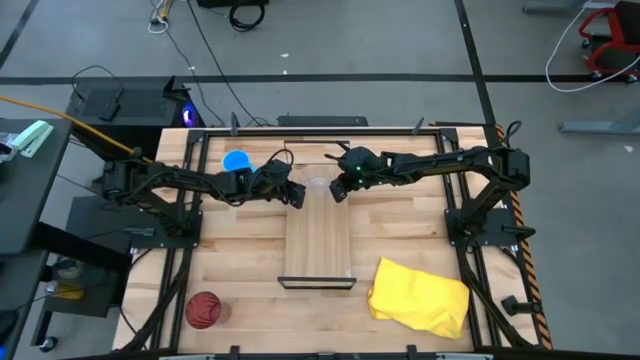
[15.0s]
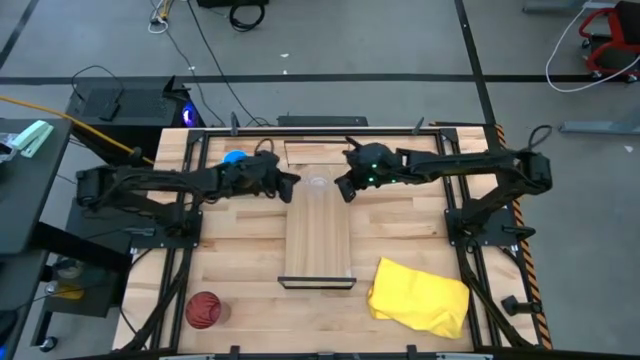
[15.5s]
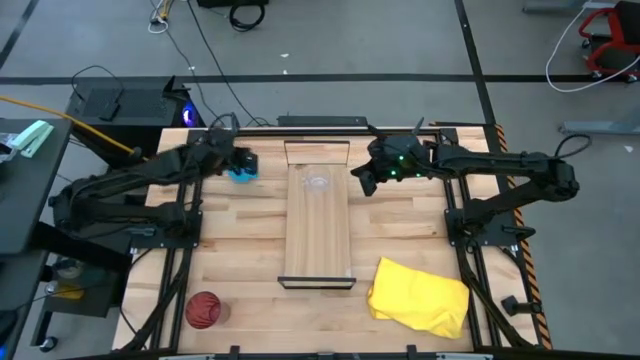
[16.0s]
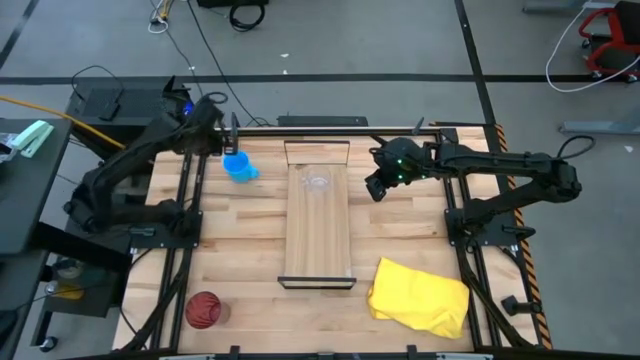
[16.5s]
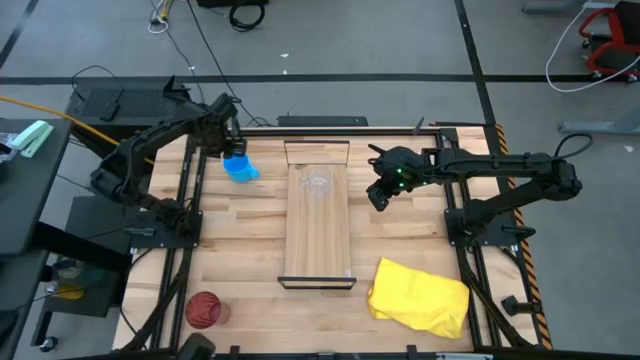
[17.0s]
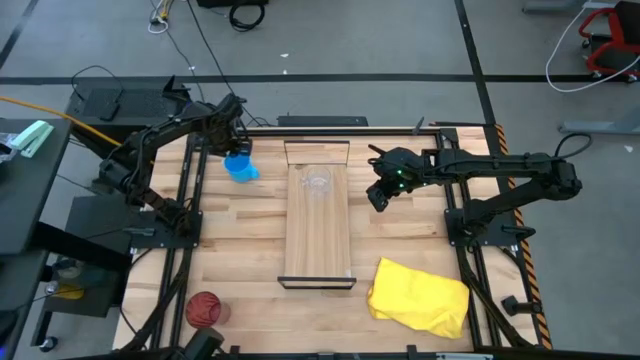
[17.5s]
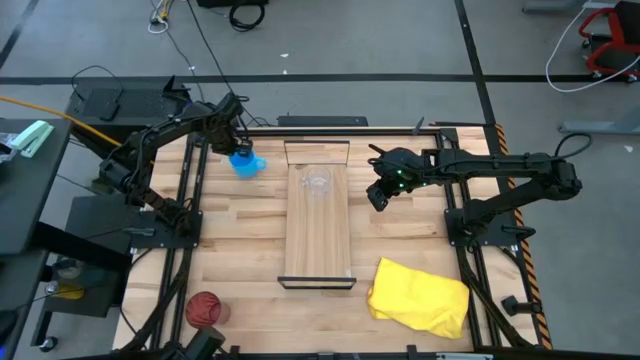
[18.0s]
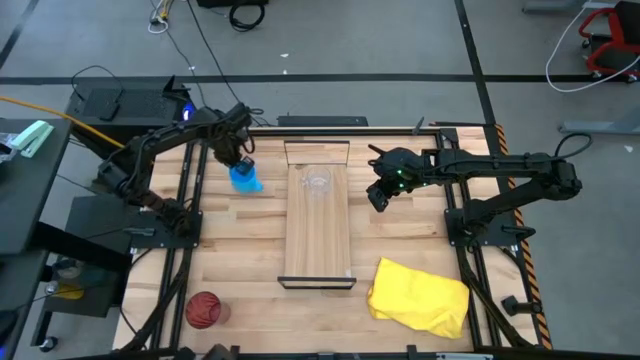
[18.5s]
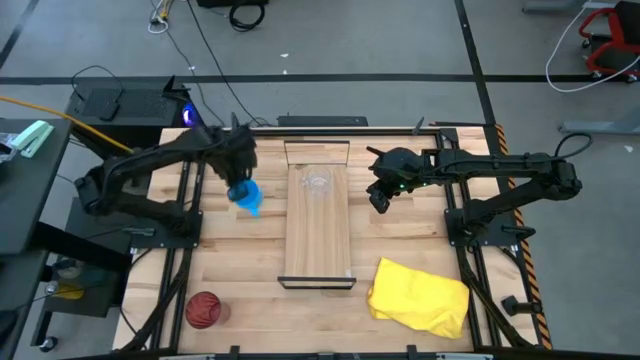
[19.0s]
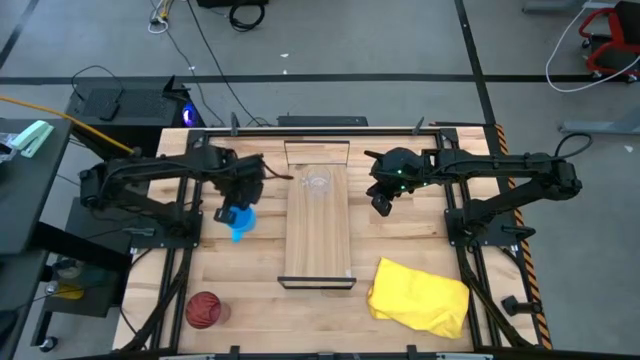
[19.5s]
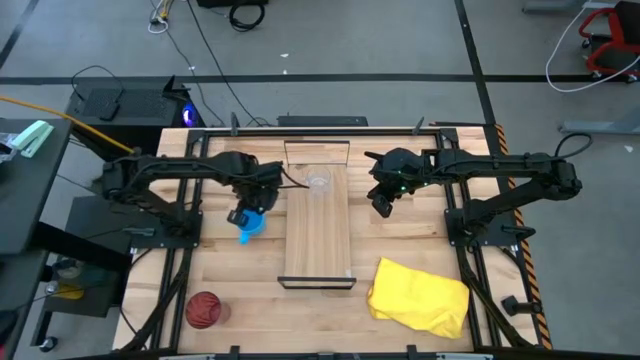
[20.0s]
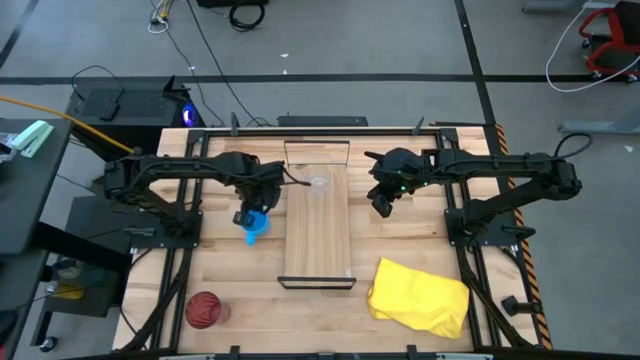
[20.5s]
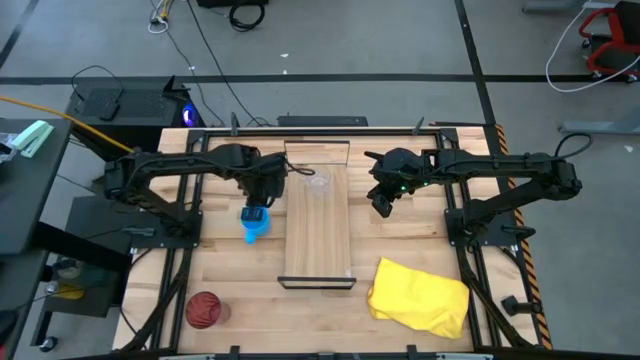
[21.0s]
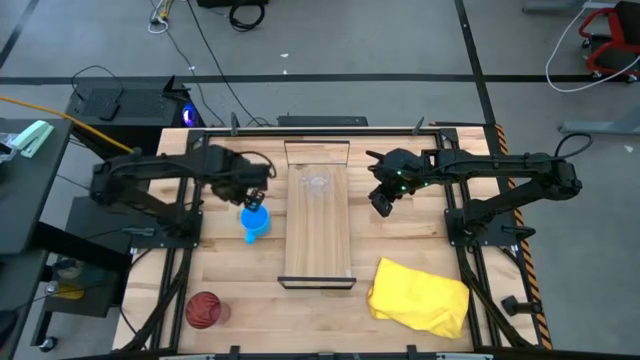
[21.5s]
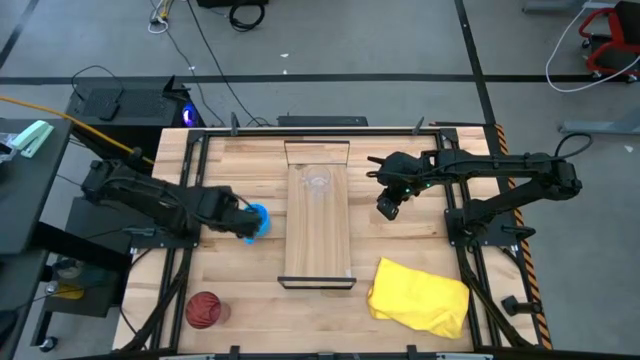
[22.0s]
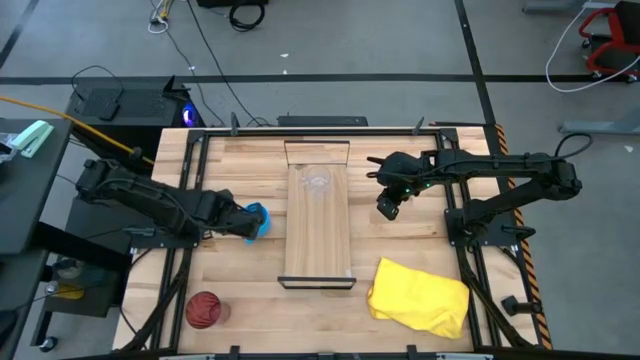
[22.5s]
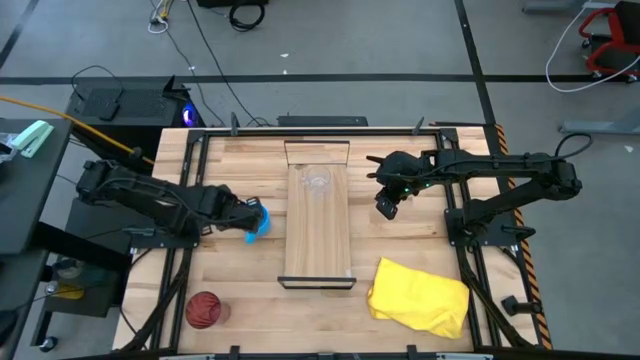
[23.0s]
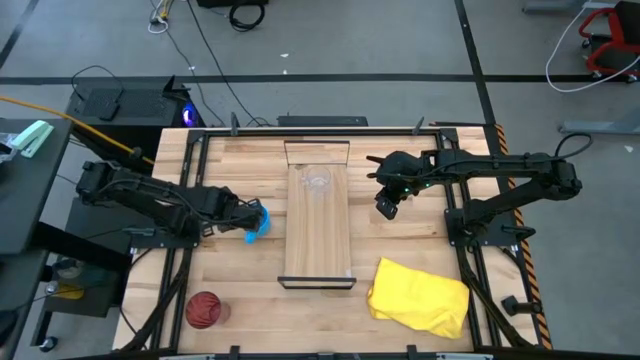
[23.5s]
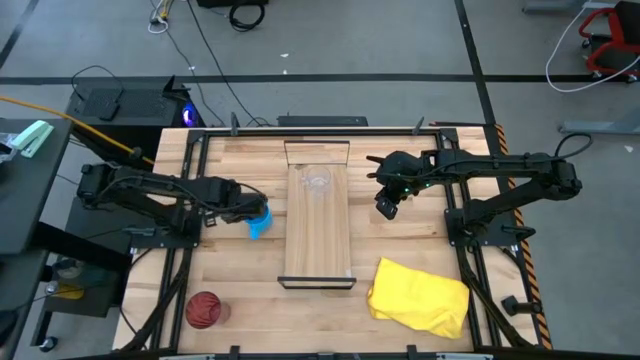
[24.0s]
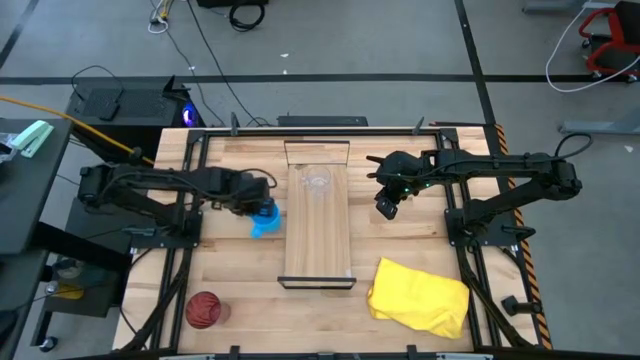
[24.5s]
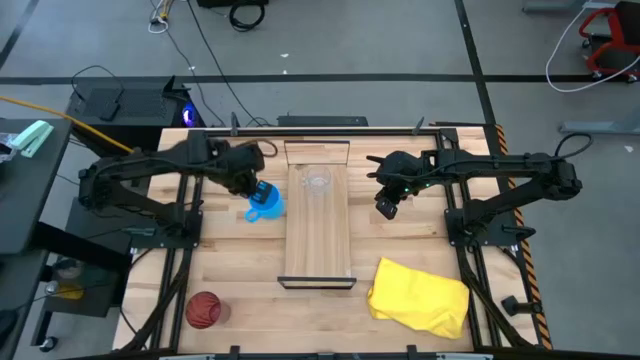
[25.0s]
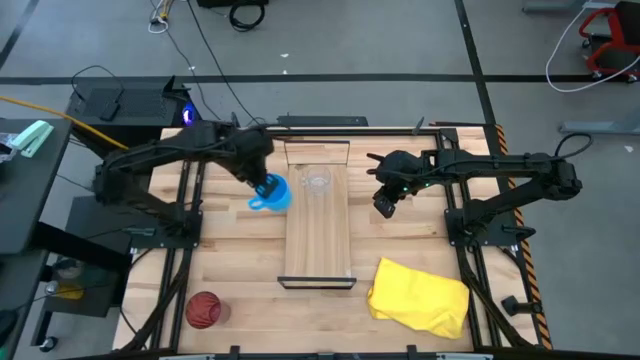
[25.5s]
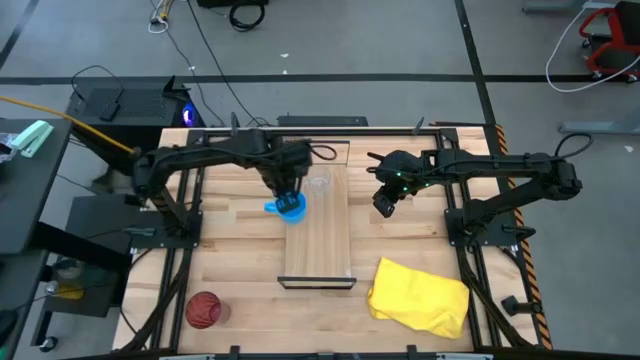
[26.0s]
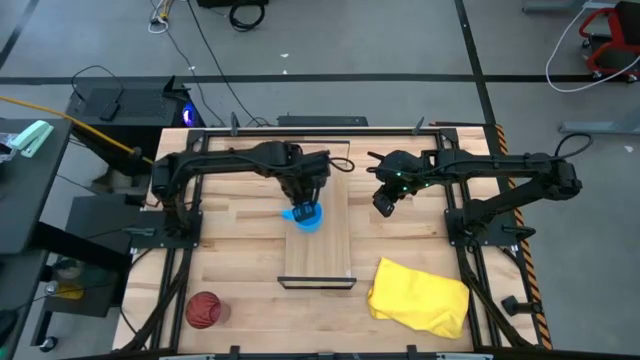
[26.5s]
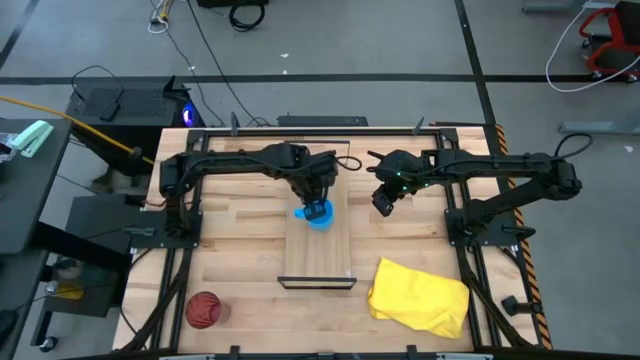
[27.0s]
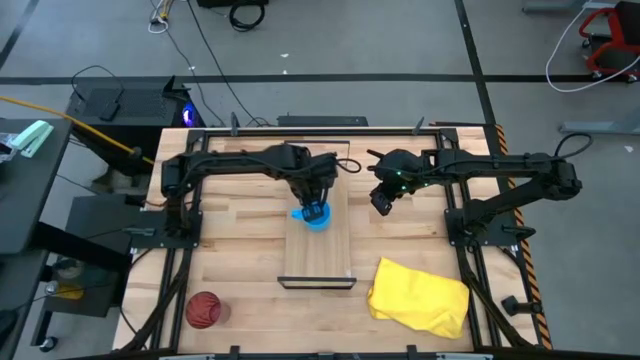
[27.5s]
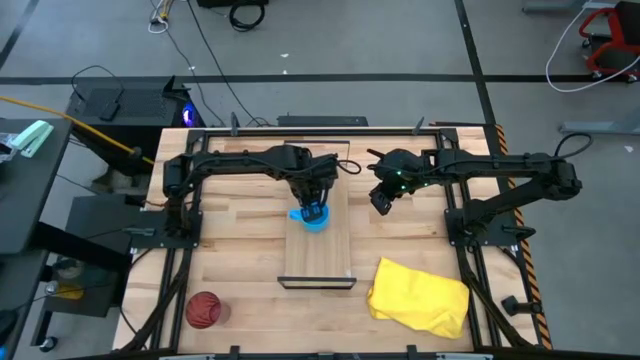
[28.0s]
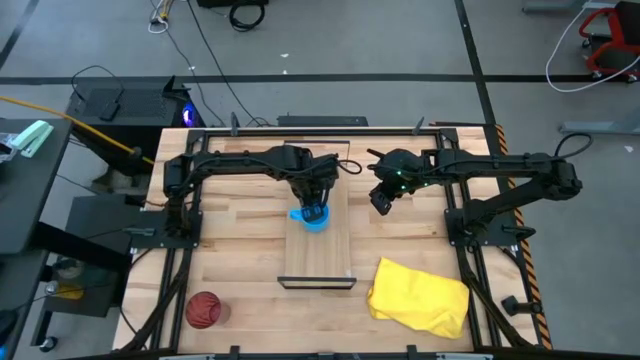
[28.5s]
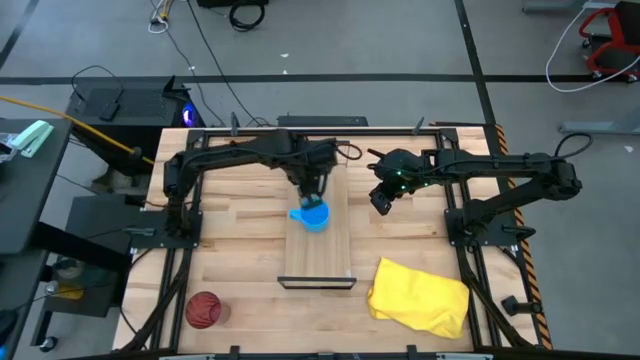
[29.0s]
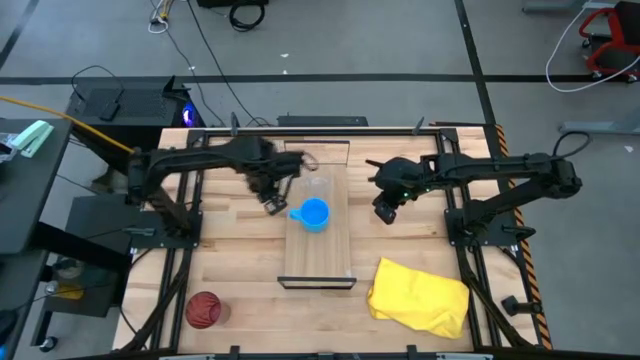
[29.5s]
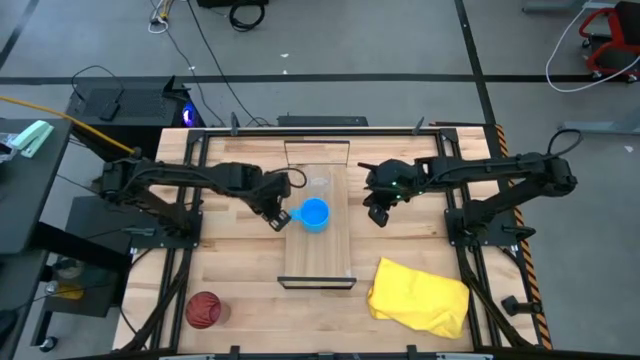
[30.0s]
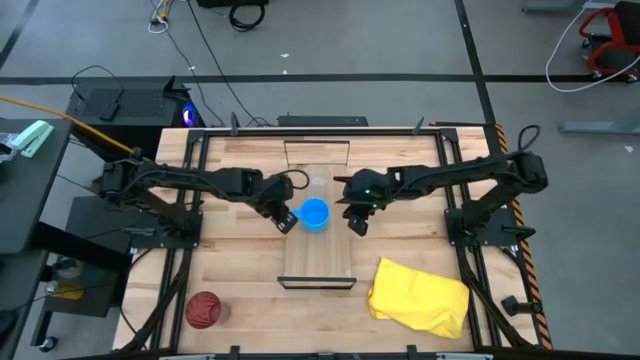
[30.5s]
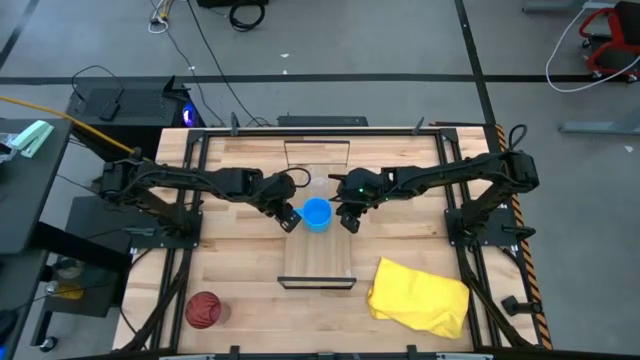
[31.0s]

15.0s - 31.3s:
Task: Stack small to large cups/mugs on shelf
Put the blue mug on the shelf

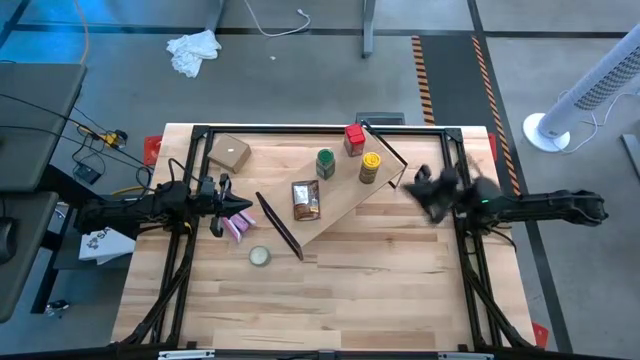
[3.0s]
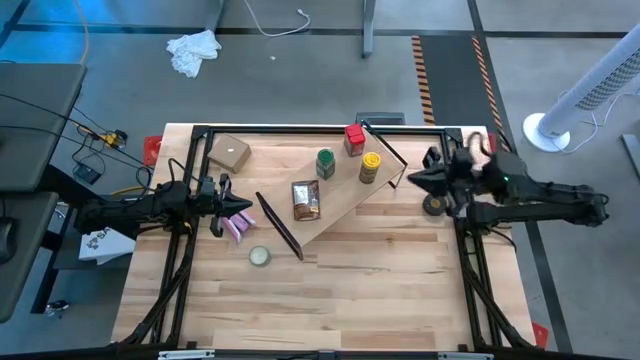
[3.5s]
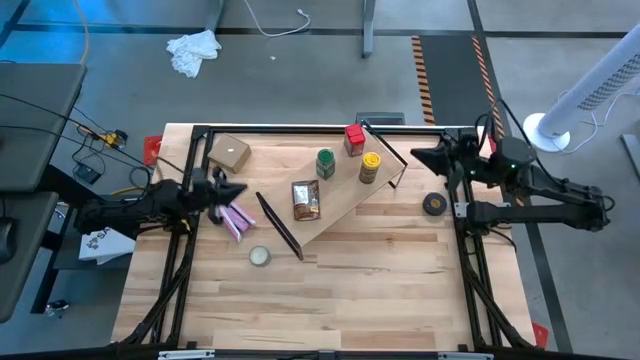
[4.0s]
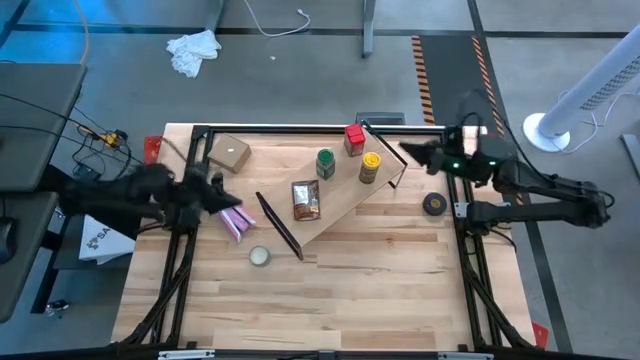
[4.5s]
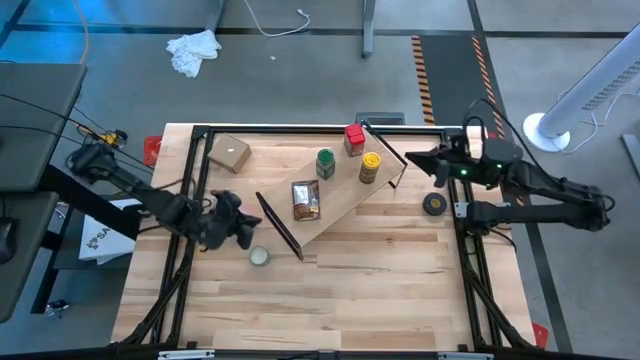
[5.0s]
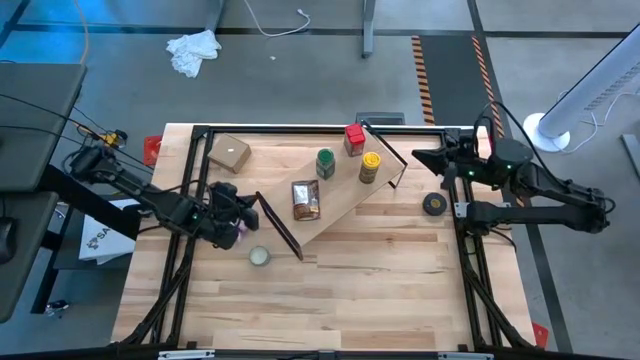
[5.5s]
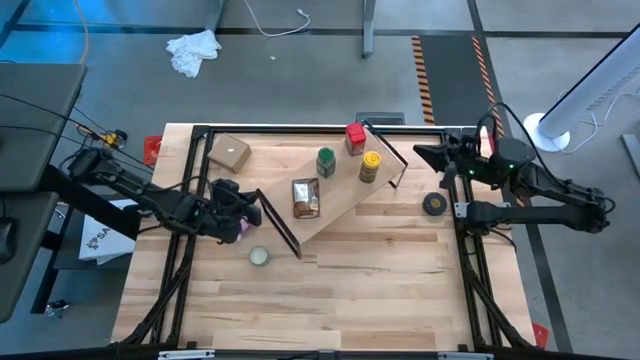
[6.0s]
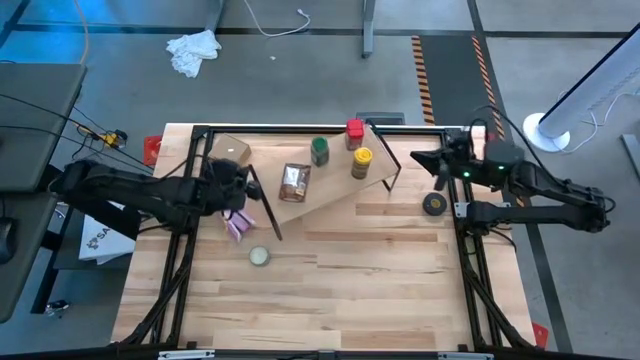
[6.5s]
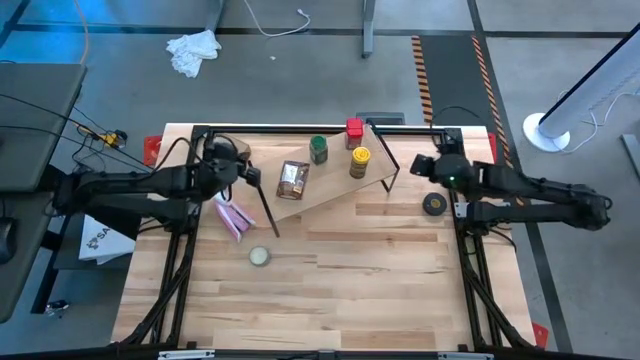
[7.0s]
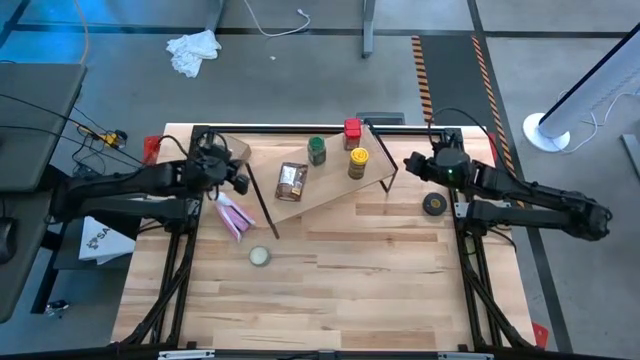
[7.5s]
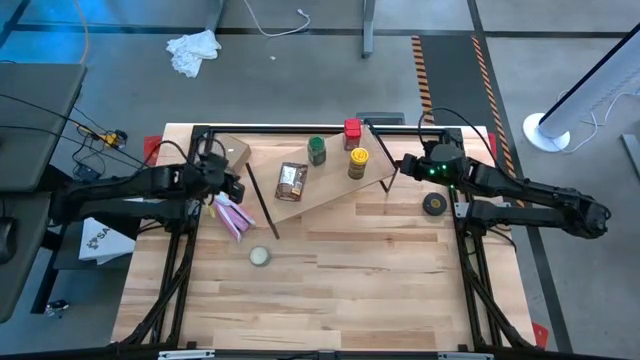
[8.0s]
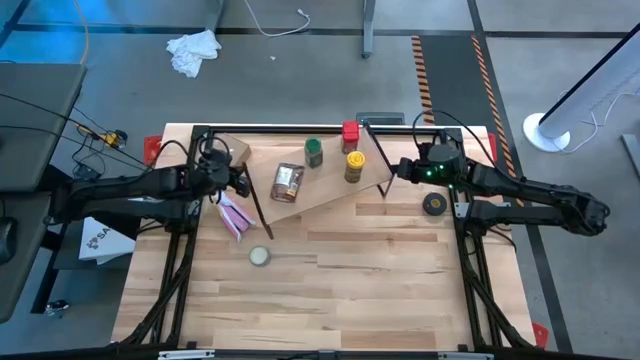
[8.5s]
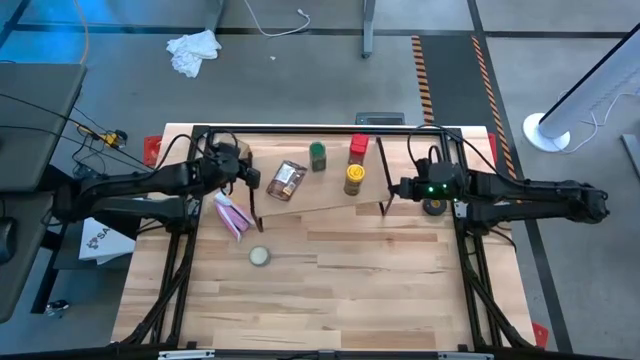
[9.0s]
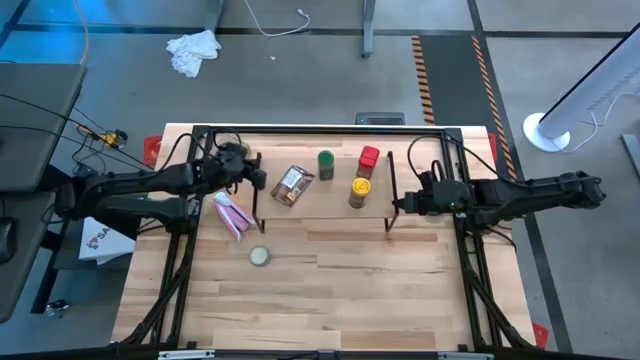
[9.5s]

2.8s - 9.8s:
Task: Shelf spices
Adjust the shelf
